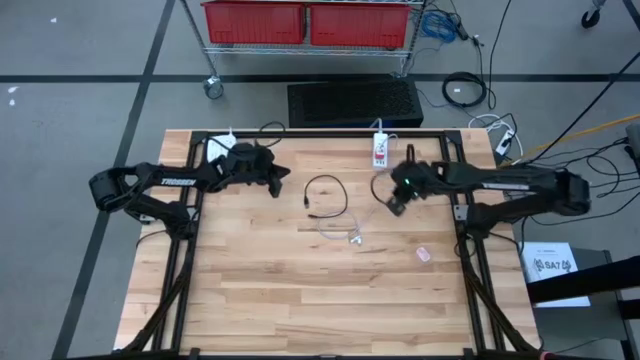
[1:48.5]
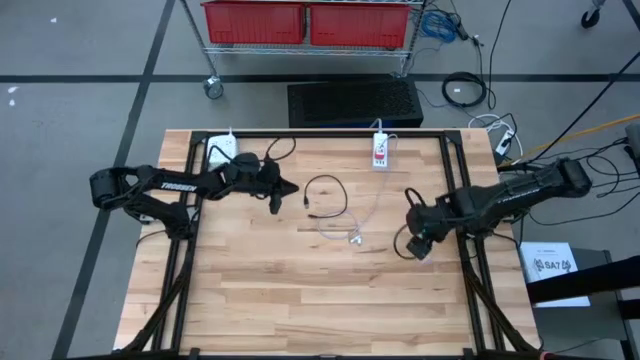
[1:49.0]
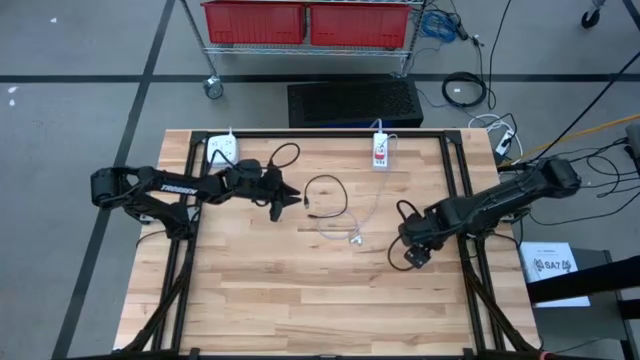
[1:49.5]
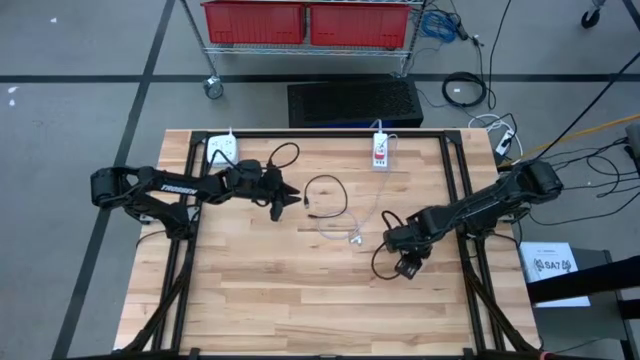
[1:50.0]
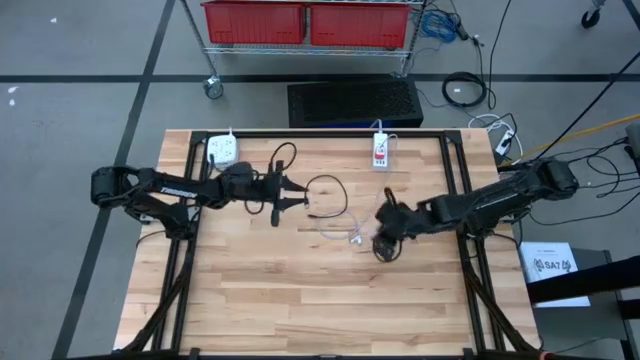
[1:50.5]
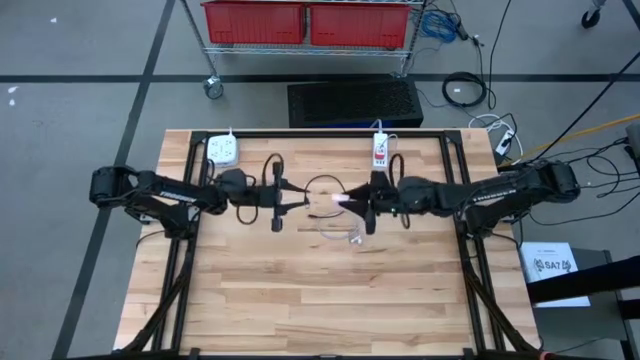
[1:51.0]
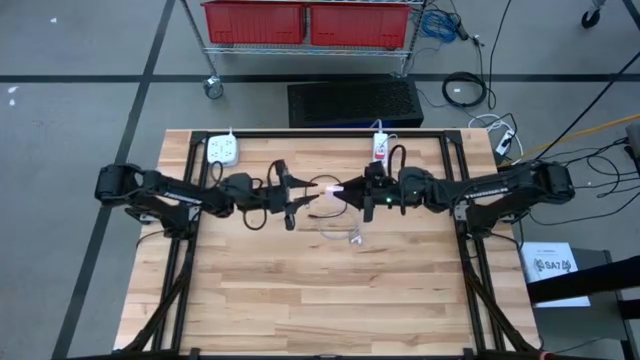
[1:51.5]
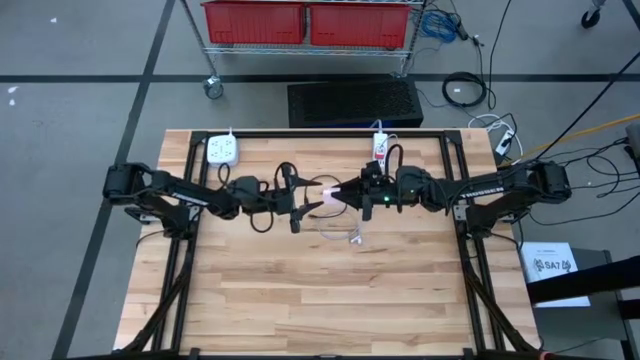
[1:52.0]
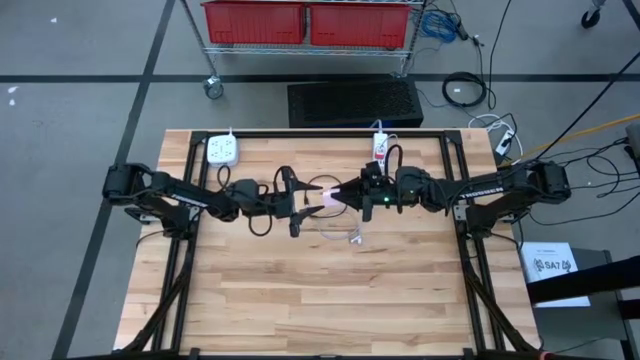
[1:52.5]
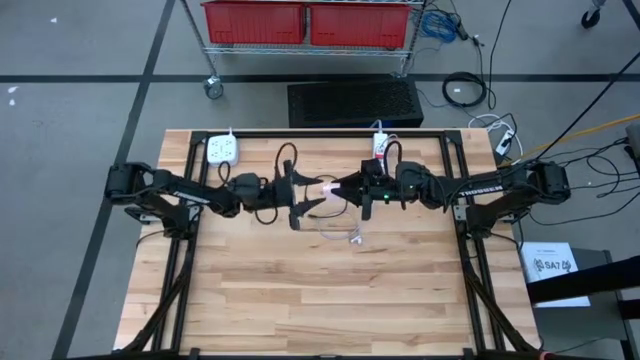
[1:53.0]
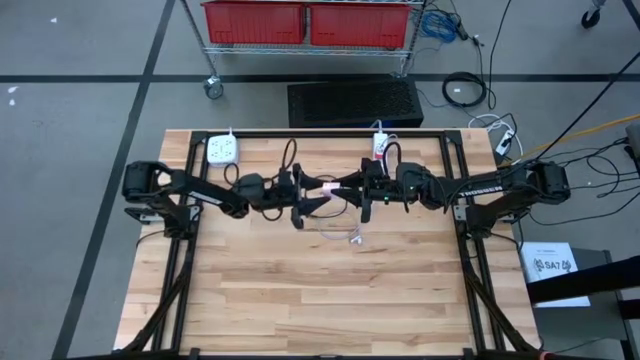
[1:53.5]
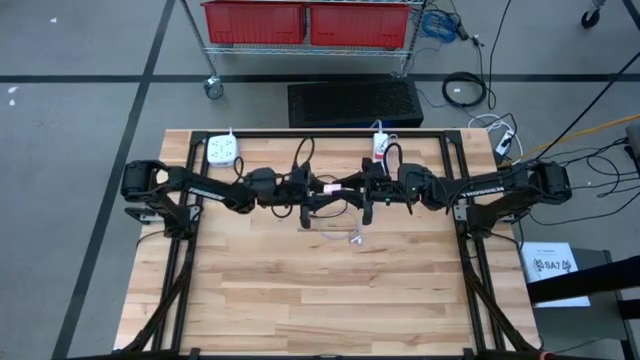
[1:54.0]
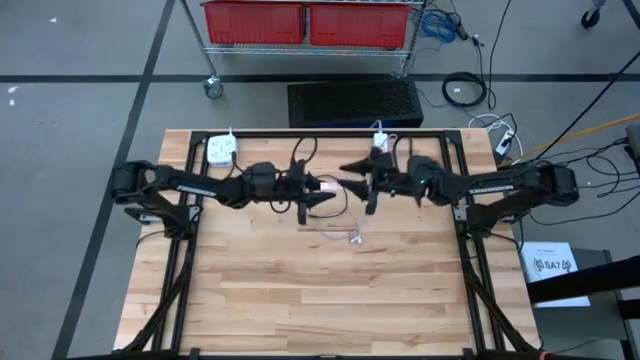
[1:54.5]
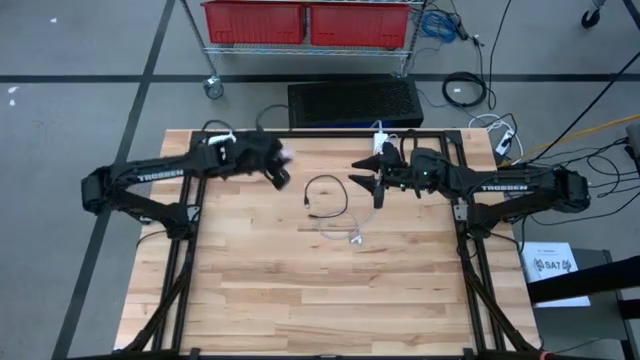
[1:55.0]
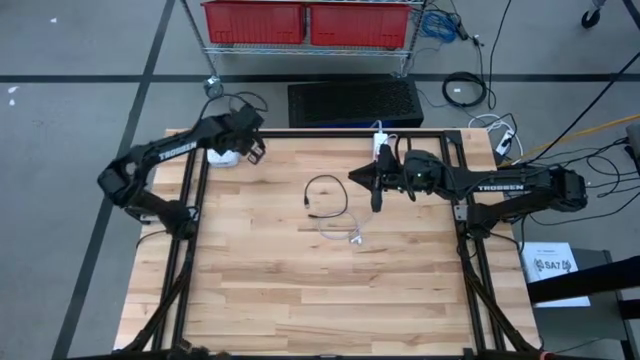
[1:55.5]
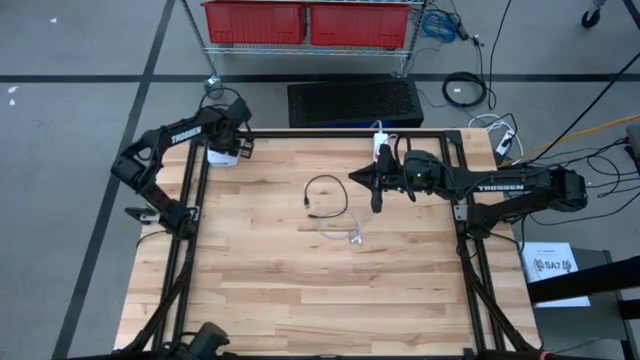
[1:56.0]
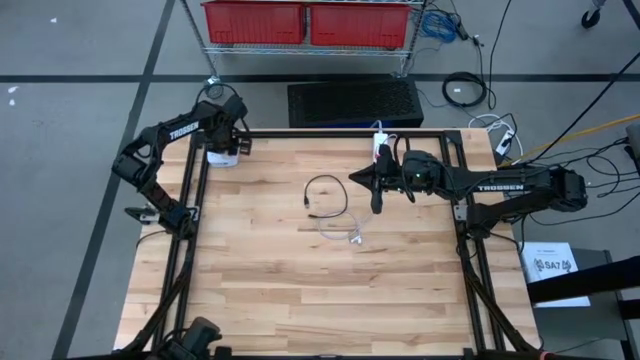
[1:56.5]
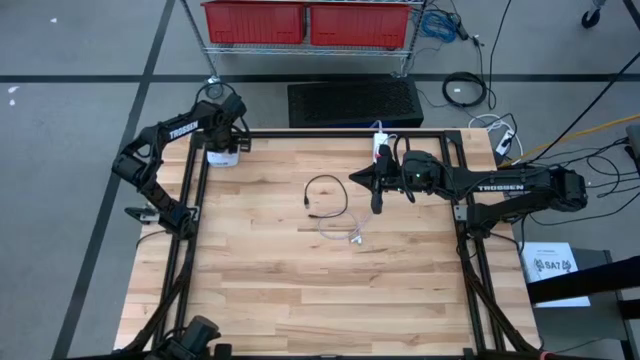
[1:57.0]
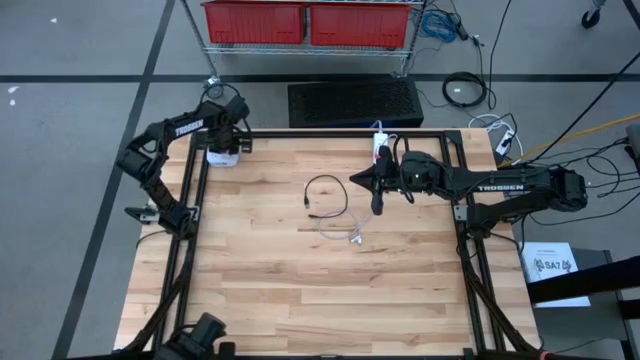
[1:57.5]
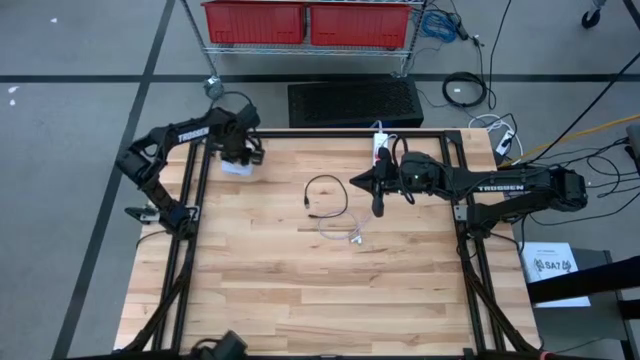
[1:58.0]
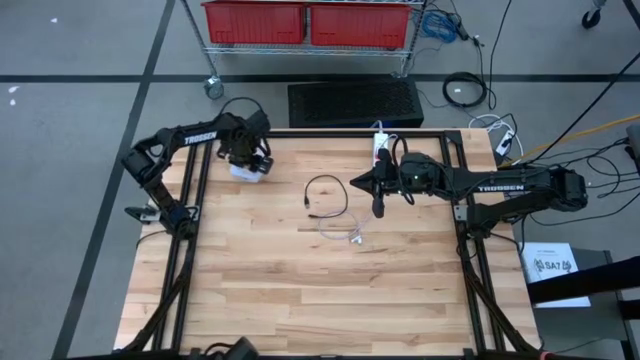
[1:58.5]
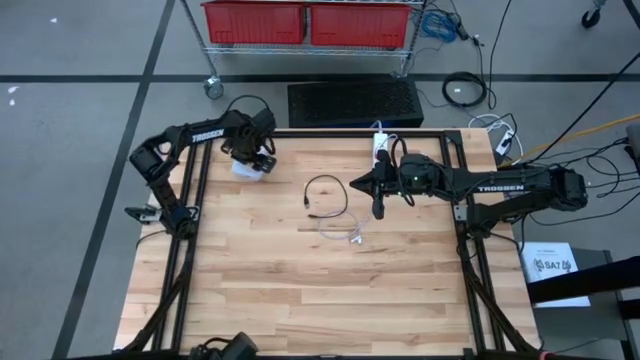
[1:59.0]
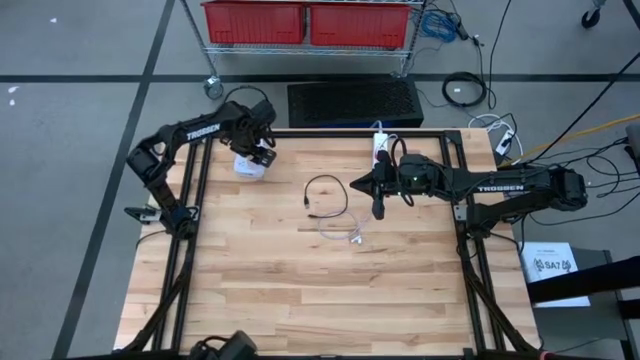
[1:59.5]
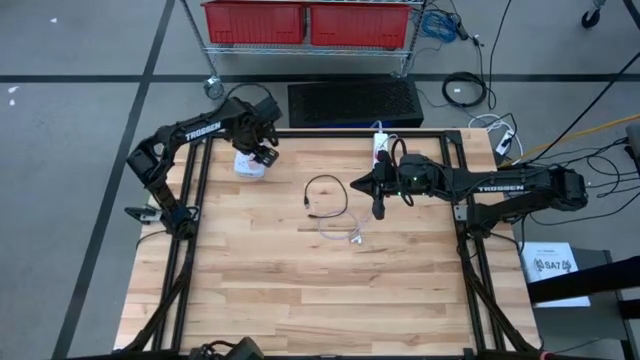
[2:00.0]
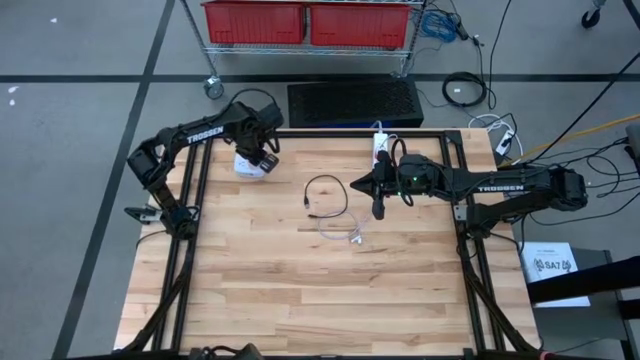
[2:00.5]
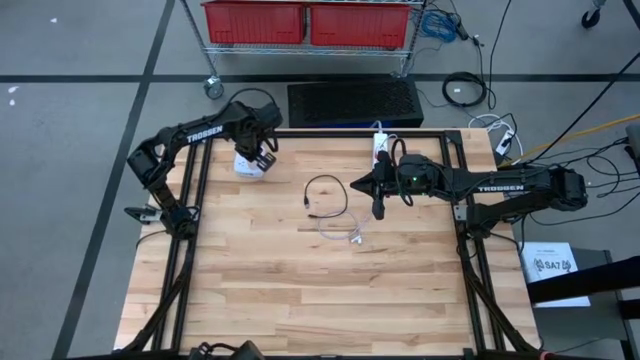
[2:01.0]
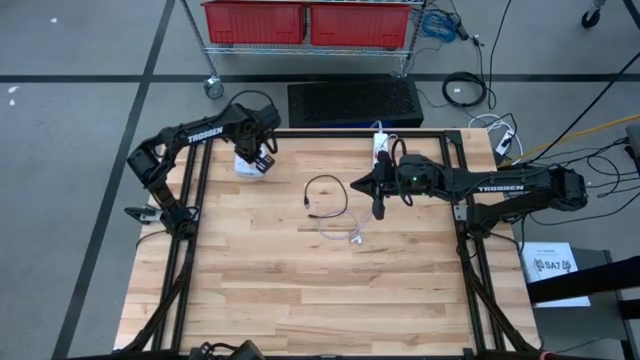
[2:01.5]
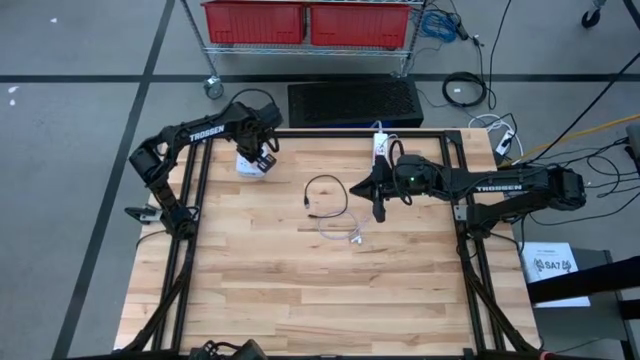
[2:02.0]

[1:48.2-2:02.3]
Task: Insert USB
Insert the orange charger adapter into the left outlet extension

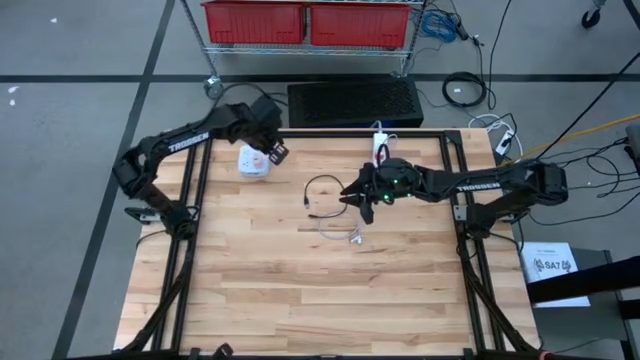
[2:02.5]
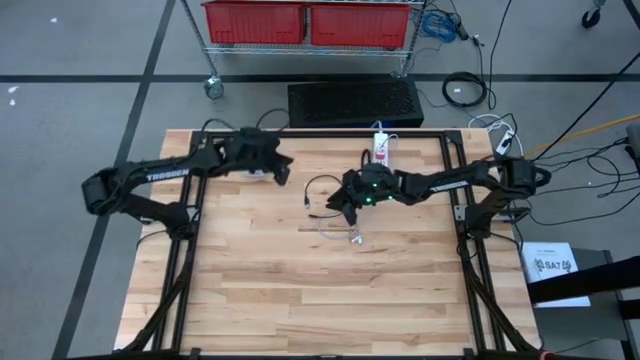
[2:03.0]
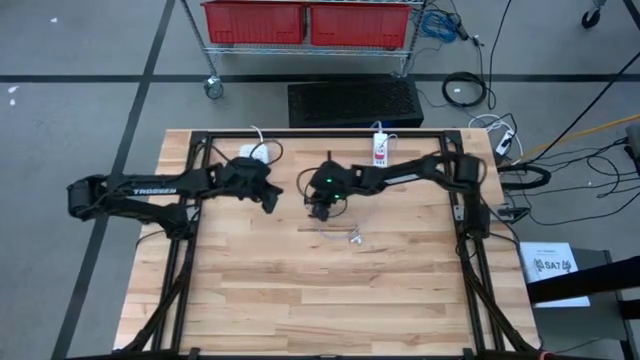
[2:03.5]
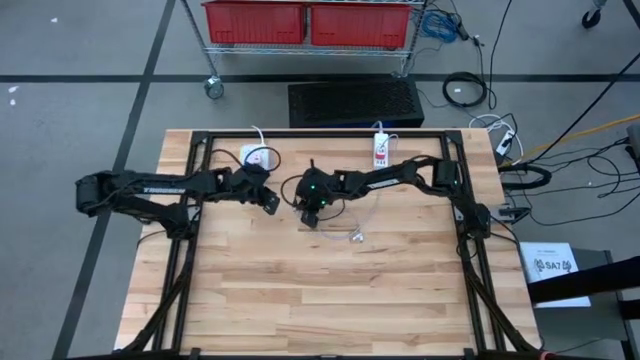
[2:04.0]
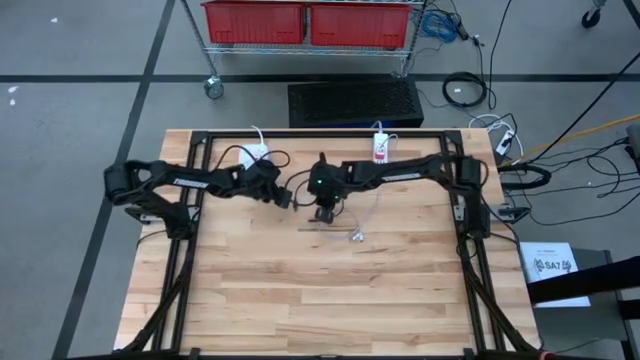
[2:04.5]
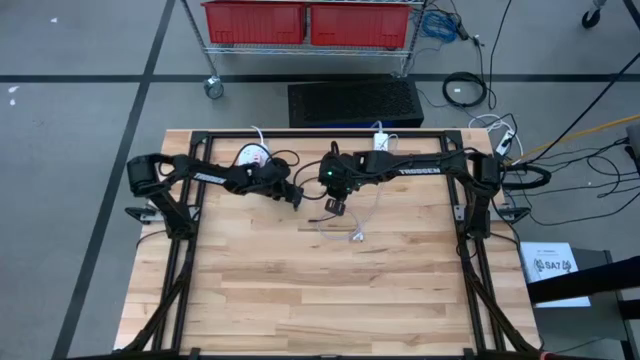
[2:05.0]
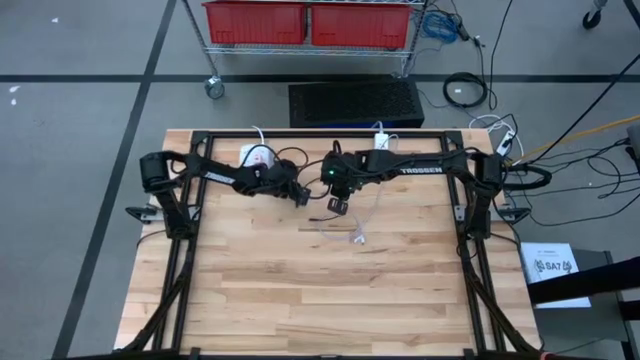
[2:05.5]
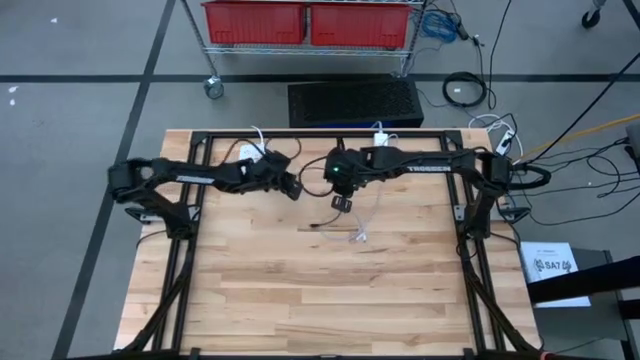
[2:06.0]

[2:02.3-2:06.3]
Insert the black charger cable into the orange charger adapter

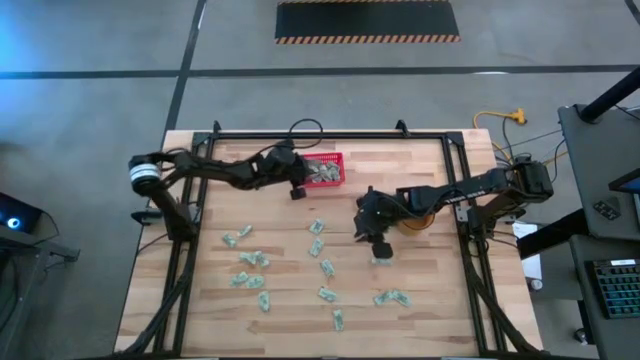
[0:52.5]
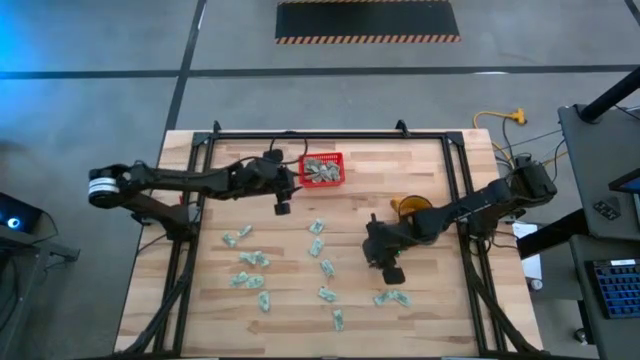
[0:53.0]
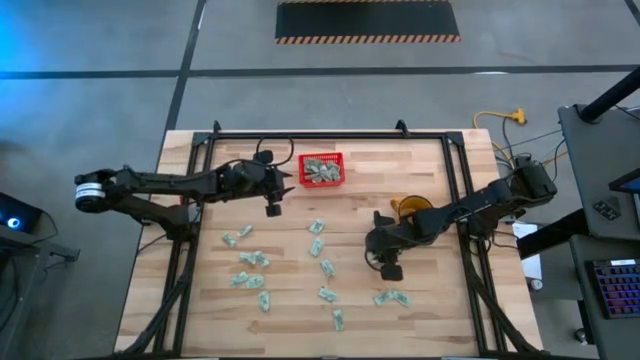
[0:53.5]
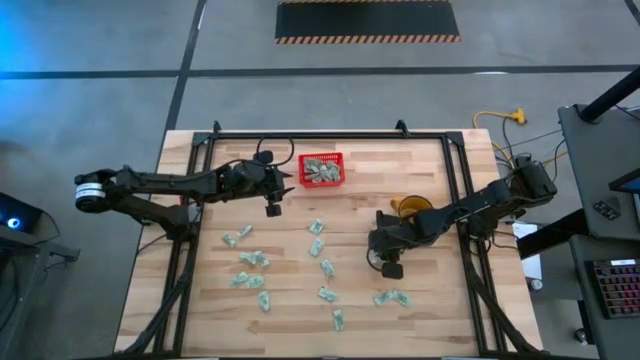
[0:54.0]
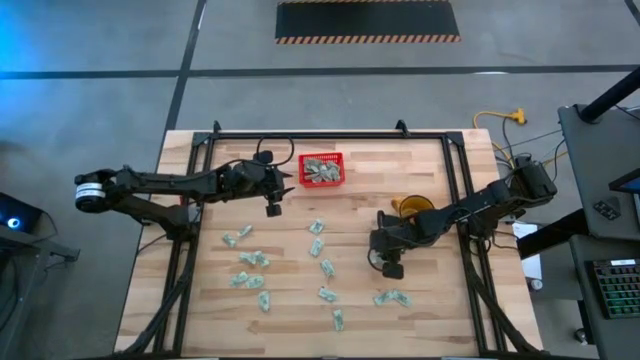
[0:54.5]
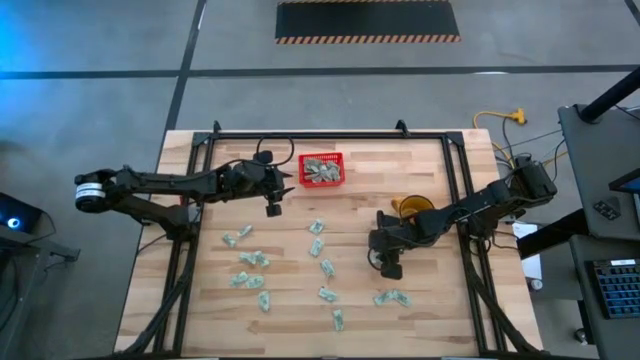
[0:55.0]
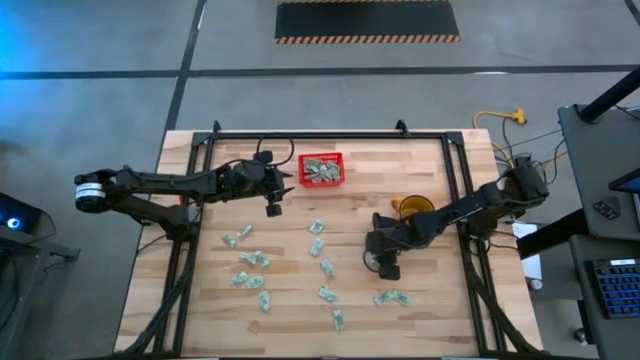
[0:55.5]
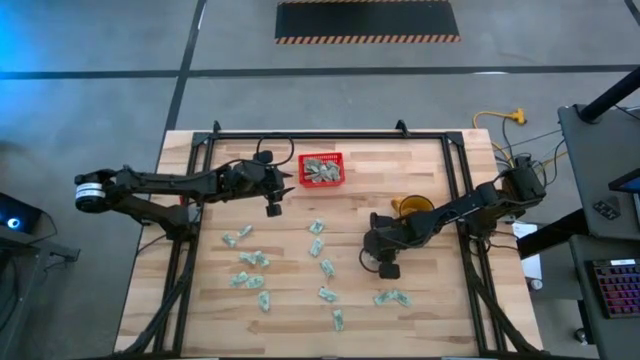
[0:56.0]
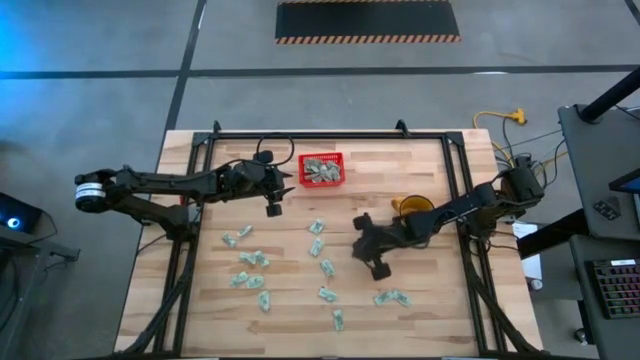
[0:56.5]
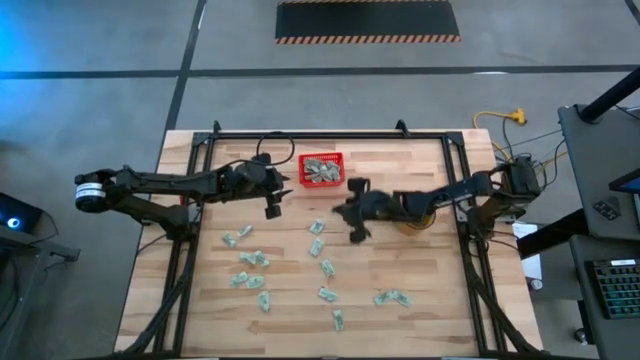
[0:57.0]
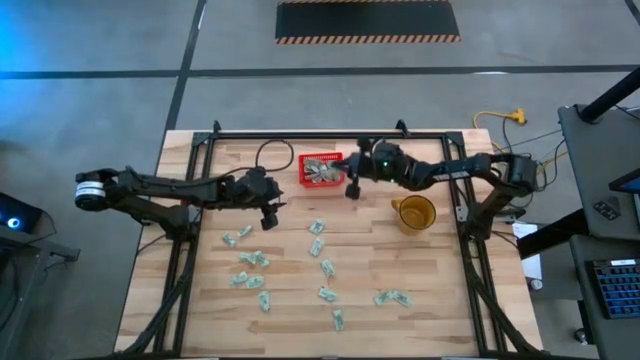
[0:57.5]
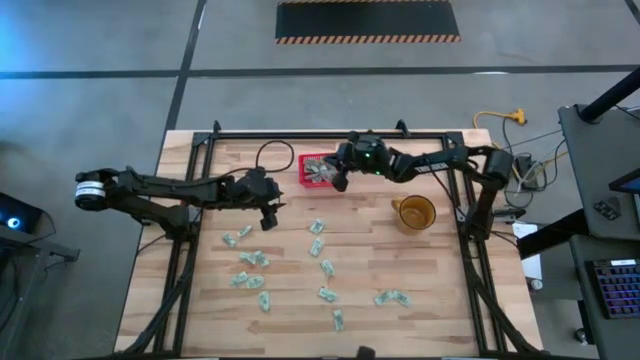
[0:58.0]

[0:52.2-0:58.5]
Task: Pick and place Stevia / Truvia into bins
Put the white stevia packet into the red bin
